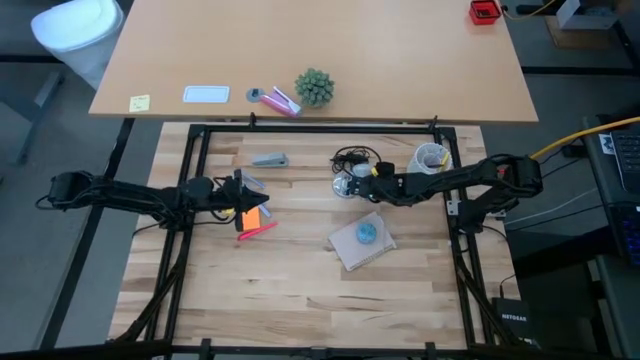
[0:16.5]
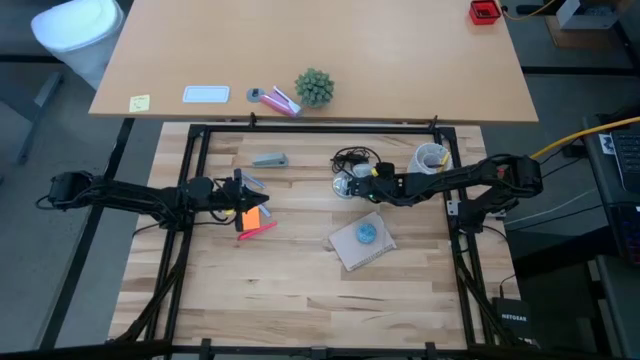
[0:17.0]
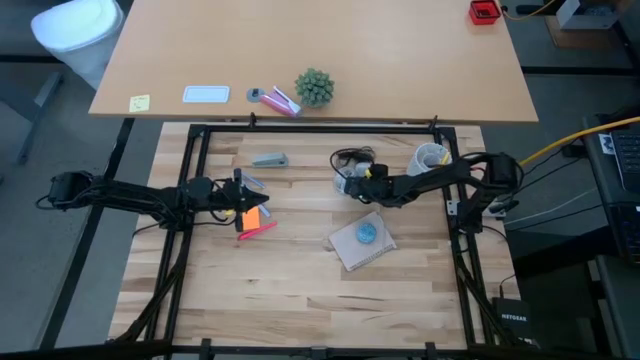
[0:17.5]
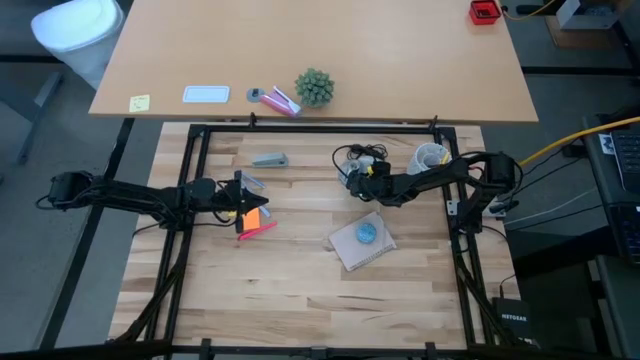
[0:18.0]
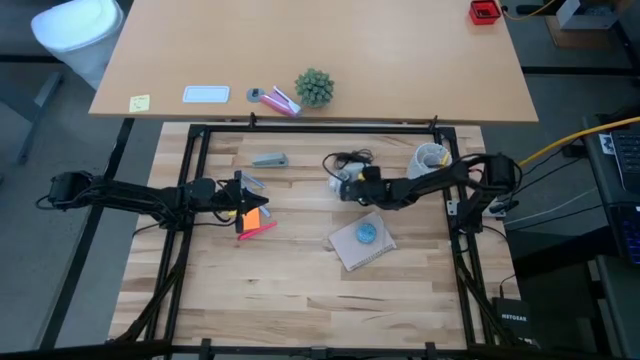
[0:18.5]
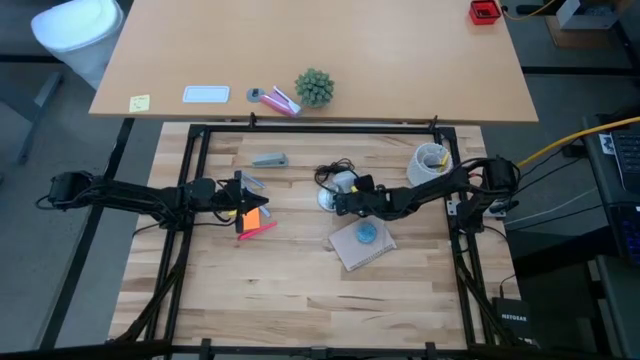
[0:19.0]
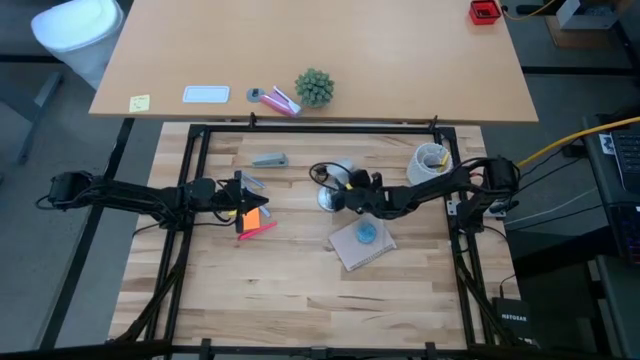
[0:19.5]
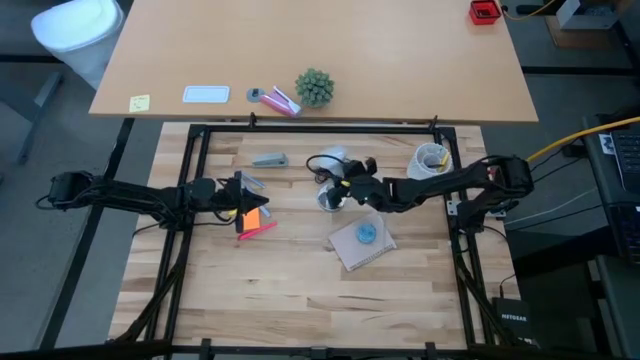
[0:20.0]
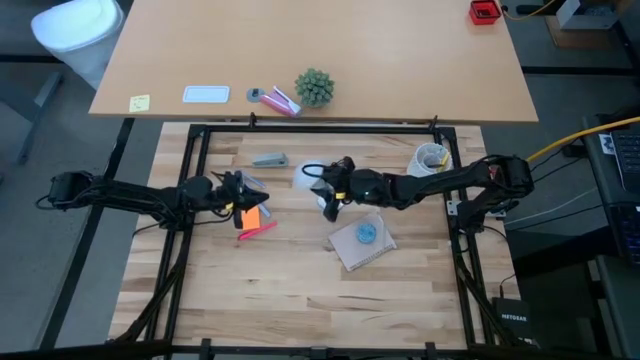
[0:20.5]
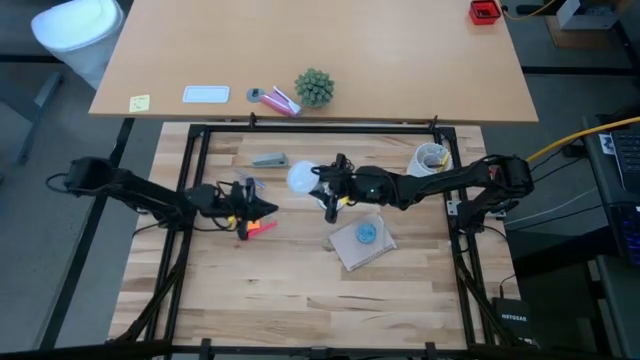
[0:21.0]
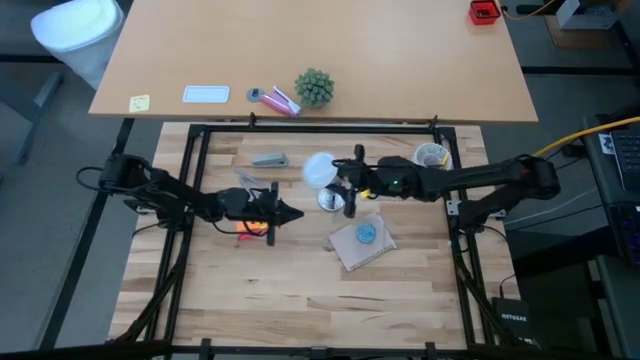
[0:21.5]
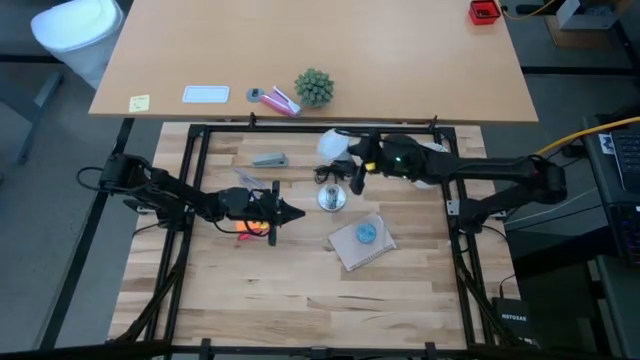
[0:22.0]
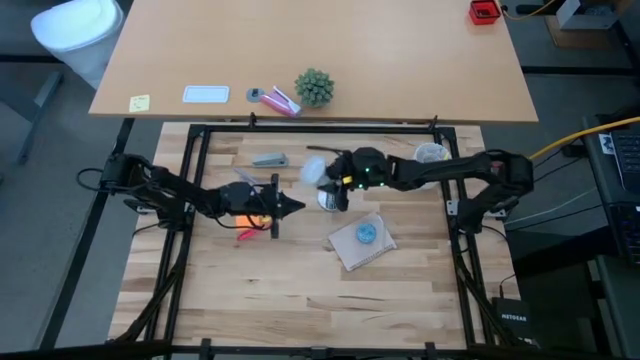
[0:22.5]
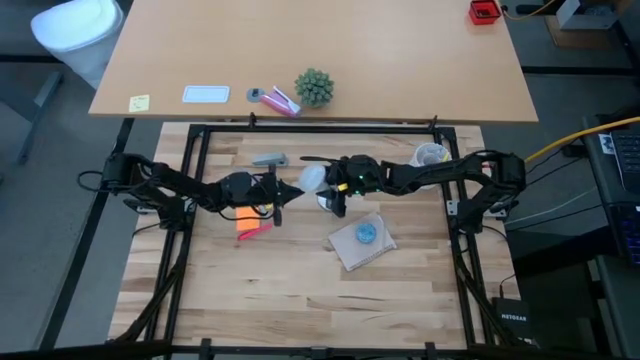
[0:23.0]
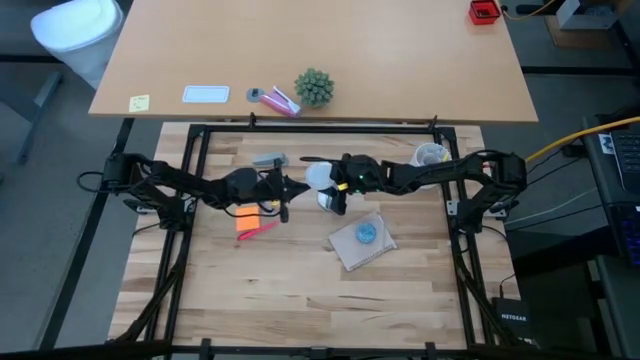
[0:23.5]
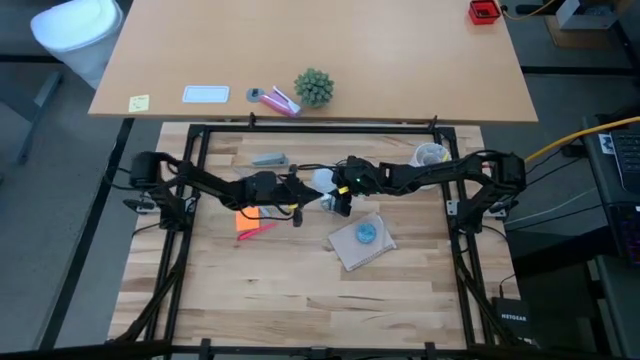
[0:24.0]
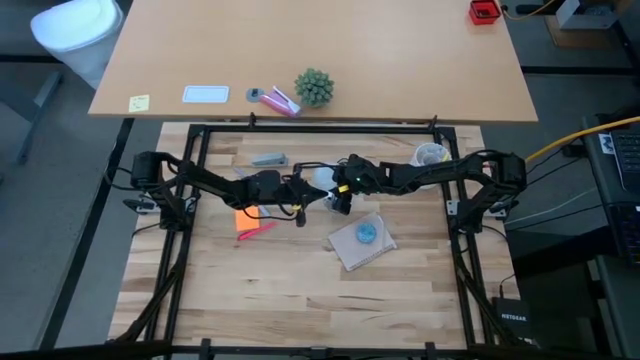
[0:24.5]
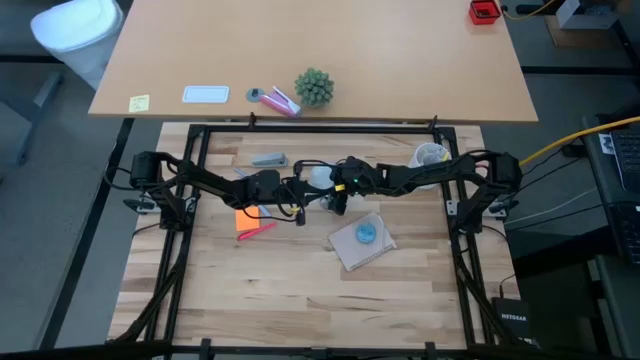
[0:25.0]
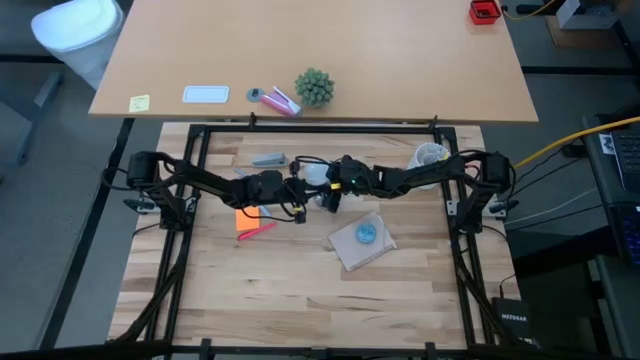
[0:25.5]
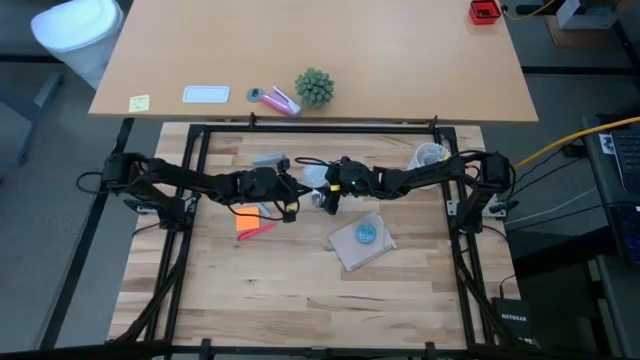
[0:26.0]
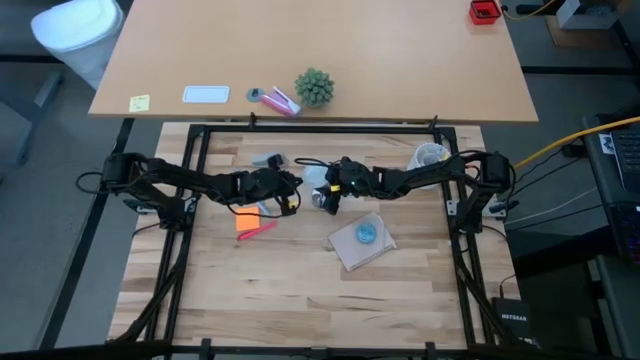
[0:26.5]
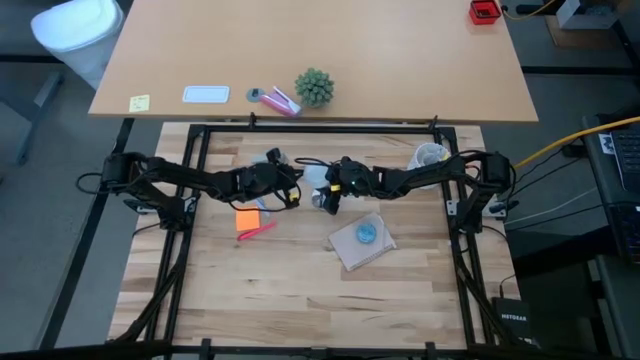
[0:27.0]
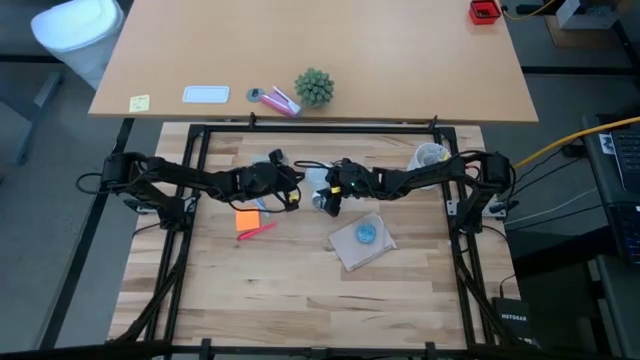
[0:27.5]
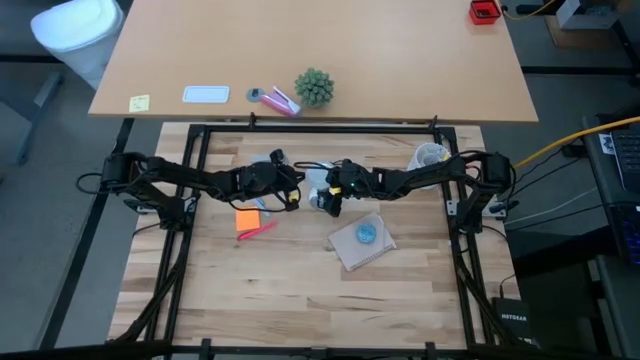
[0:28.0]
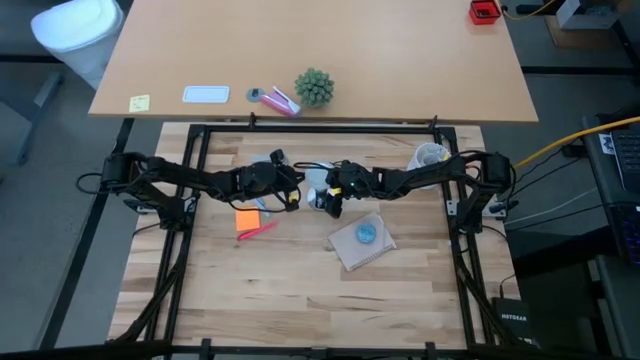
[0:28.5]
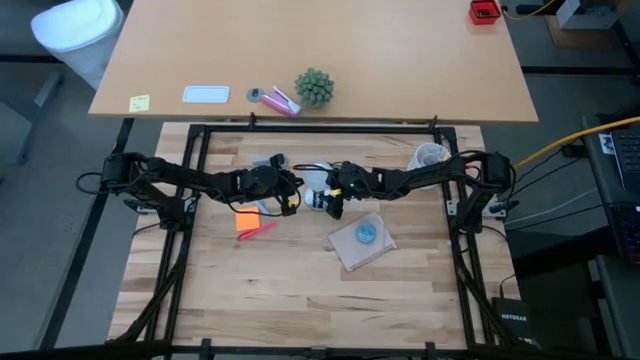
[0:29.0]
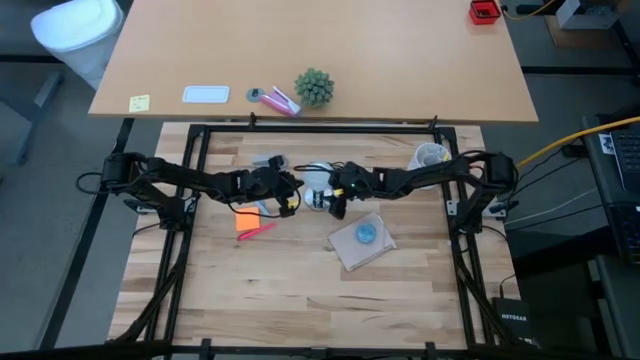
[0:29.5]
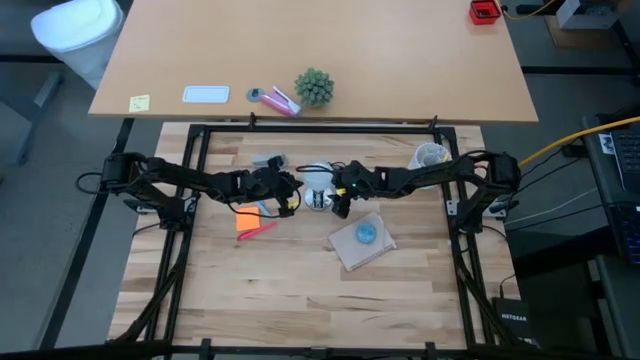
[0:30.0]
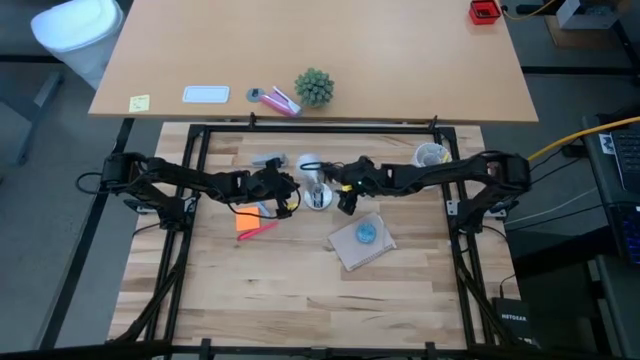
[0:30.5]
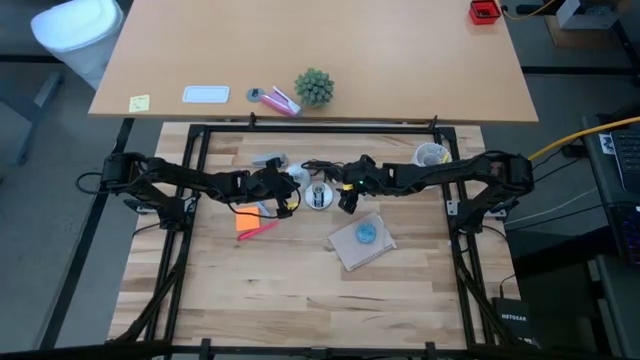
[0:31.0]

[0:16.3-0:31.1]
Task: Screw lightbulb
Insert the lightbulb into the lamp

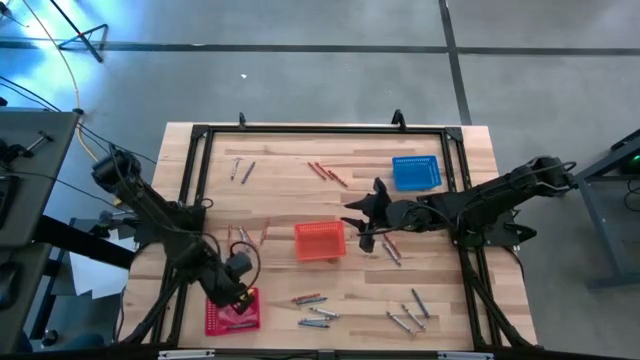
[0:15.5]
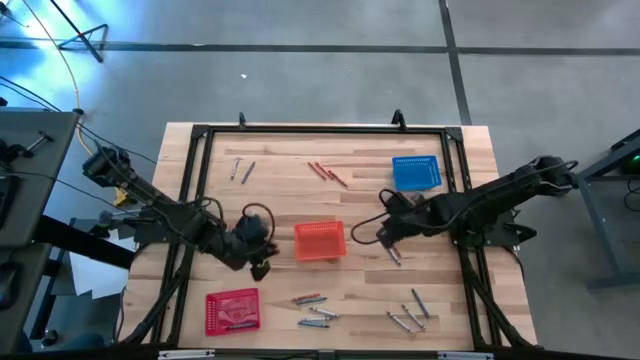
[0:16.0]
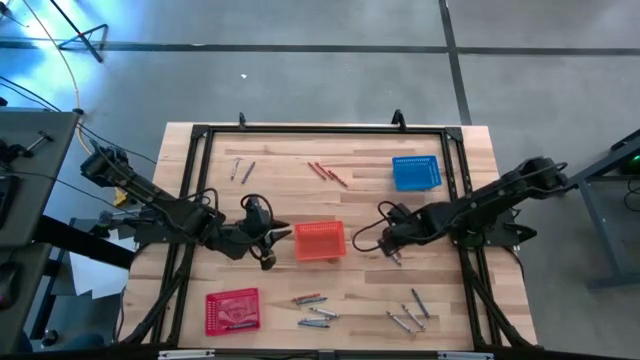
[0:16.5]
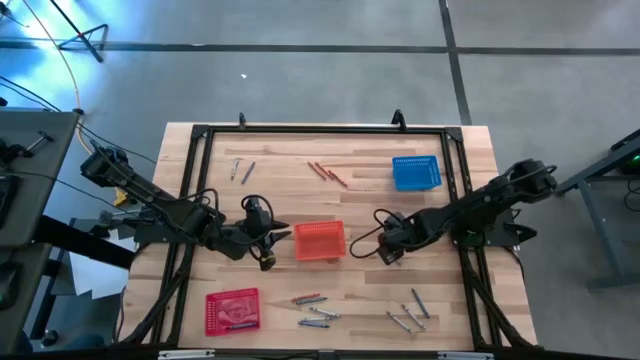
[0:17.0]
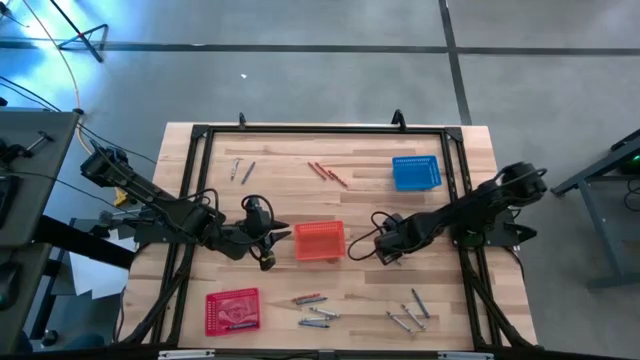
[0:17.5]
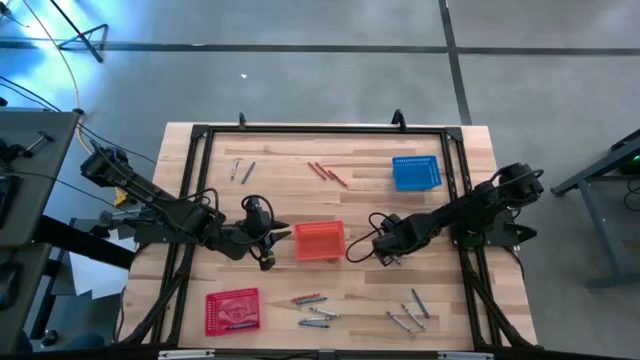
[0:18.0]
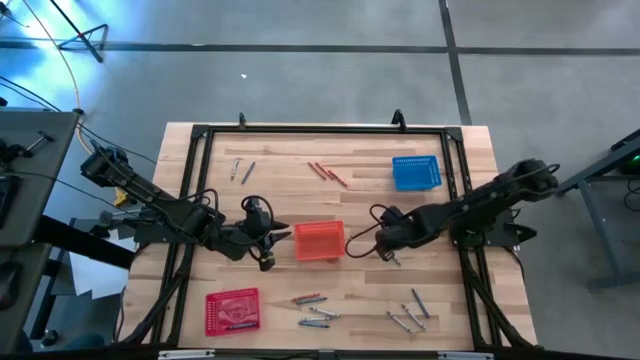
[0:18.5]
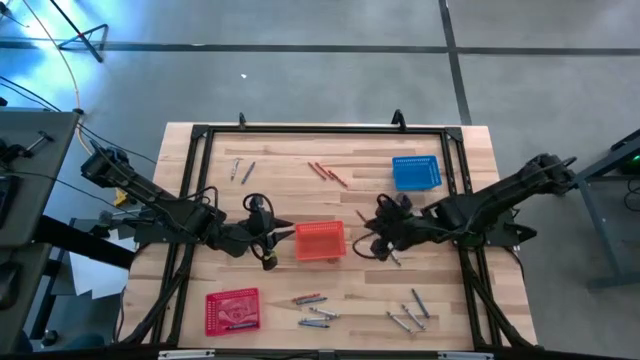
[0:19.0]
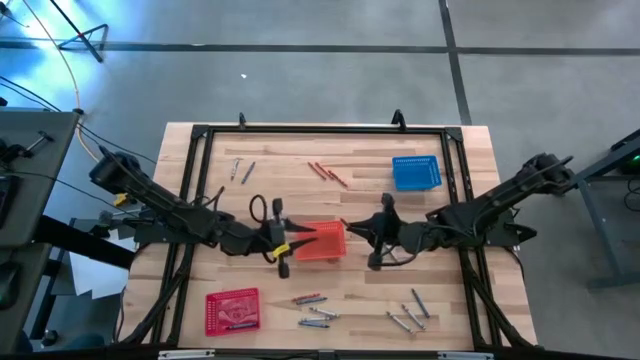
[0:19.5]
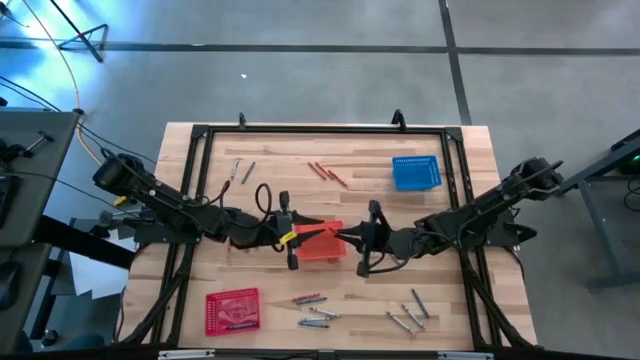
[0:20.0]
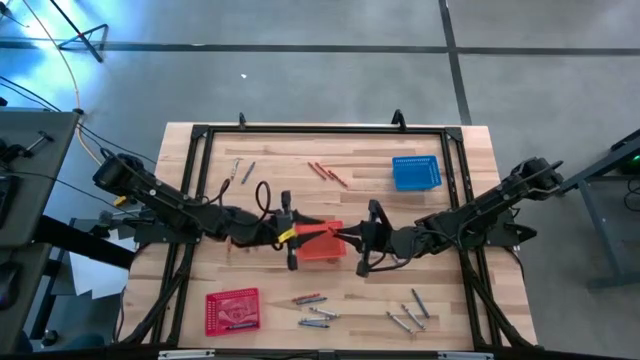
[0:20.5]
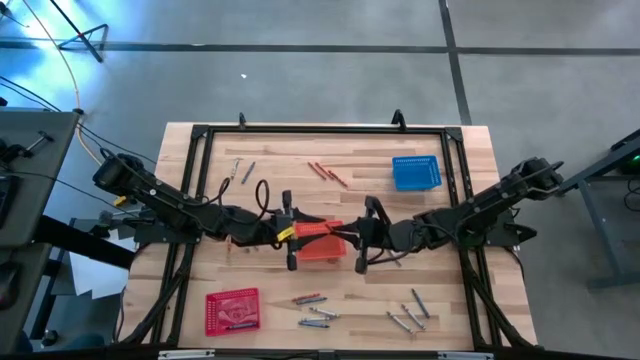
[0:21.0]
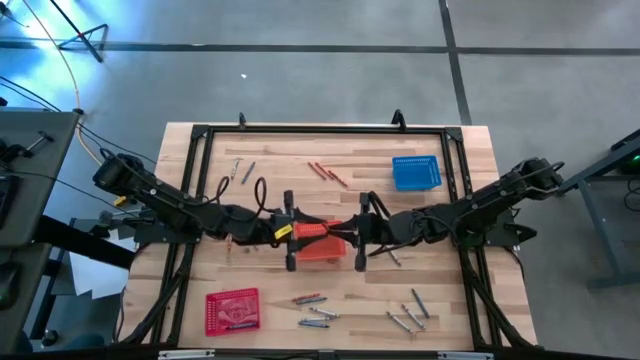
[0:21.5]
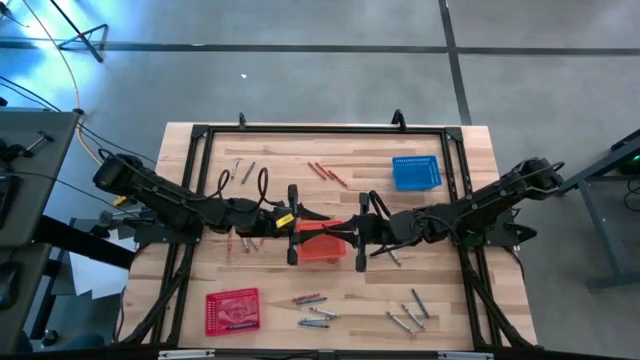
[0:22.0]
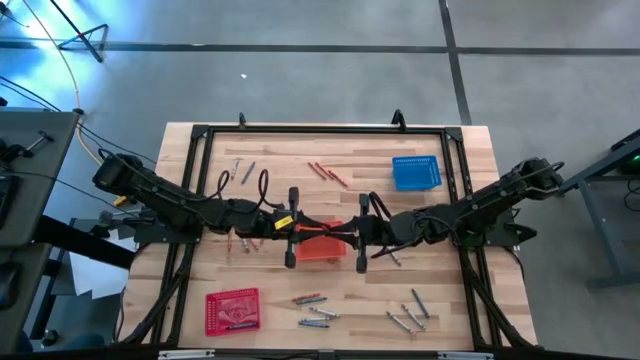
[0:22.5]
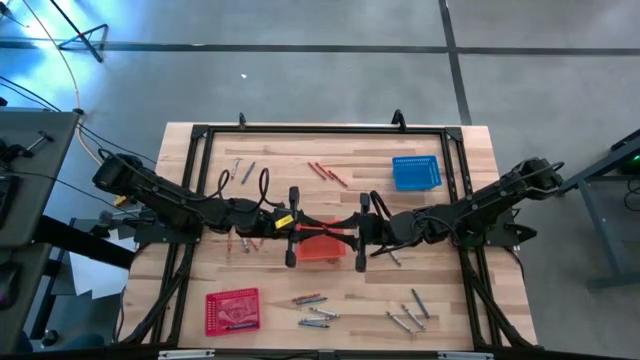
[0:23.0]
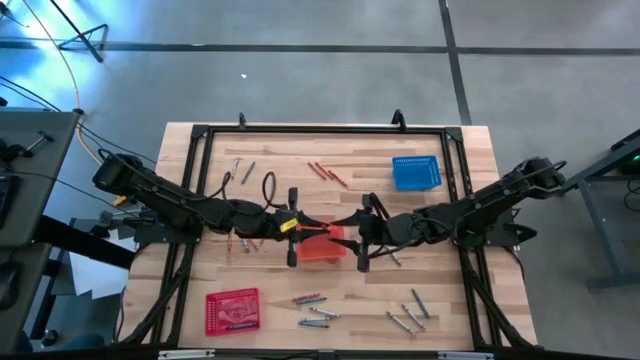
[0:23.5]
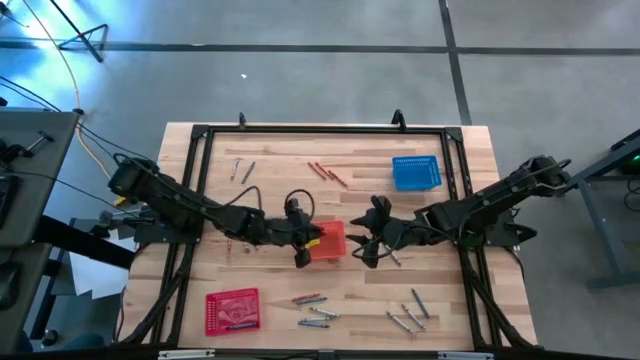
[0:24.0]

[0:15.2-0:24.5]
Task: Sort crayons
Put the orange crayon into the orange bin
